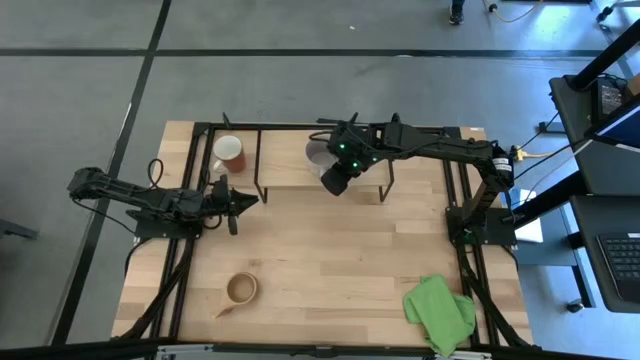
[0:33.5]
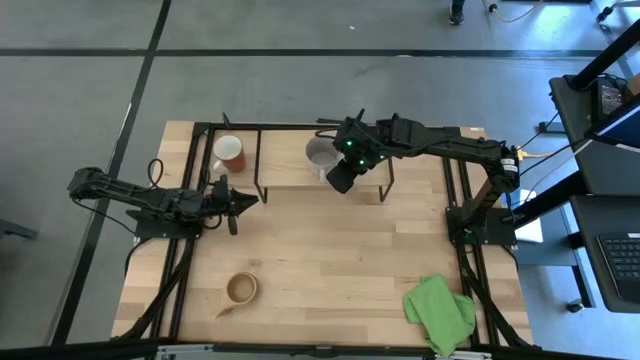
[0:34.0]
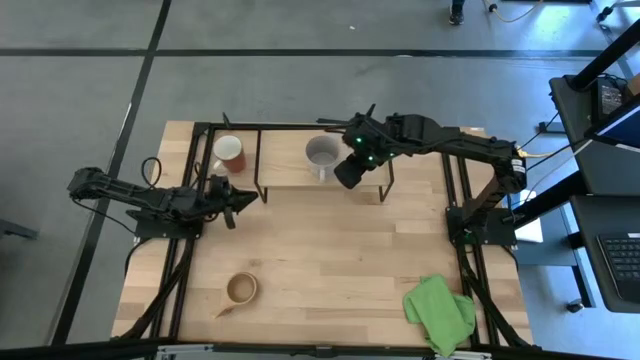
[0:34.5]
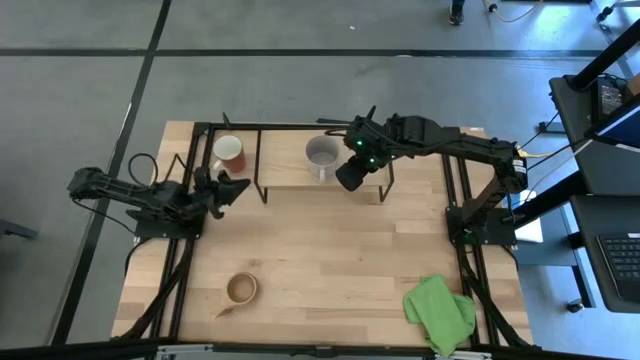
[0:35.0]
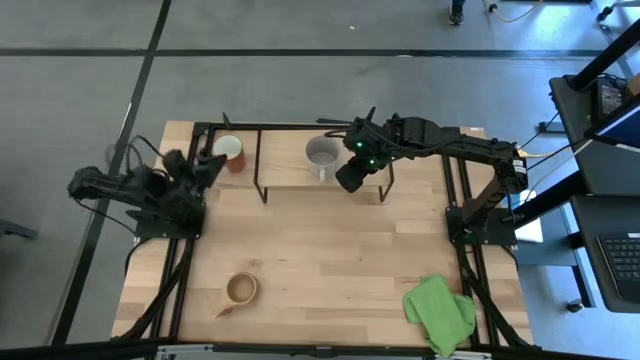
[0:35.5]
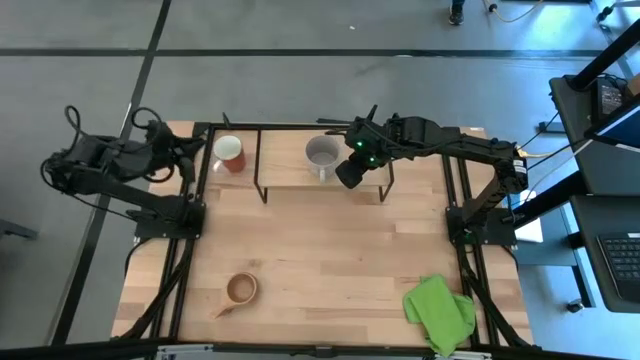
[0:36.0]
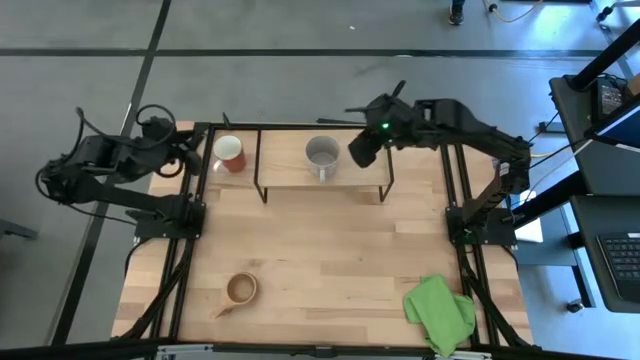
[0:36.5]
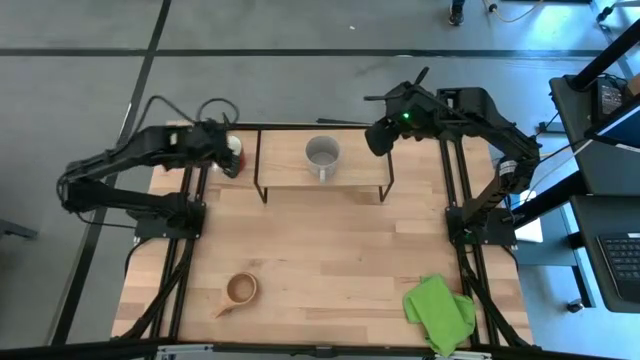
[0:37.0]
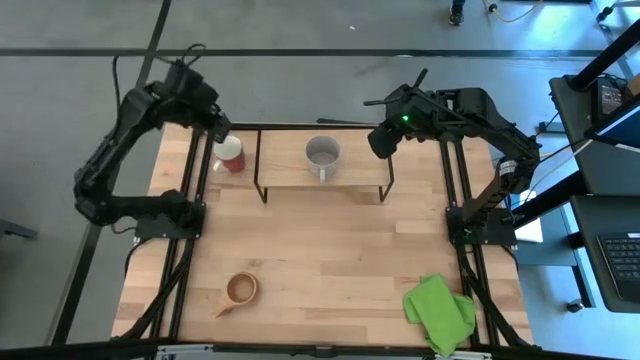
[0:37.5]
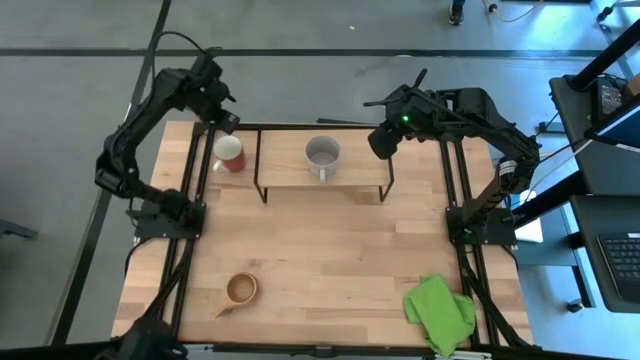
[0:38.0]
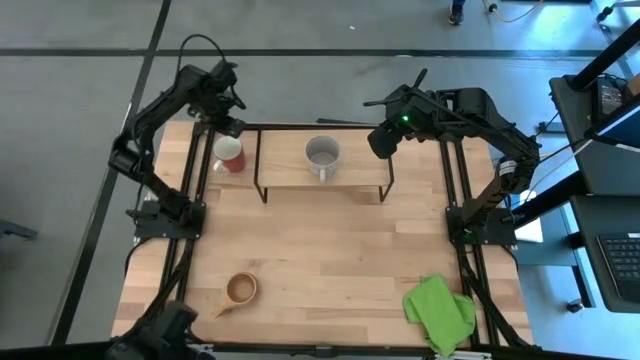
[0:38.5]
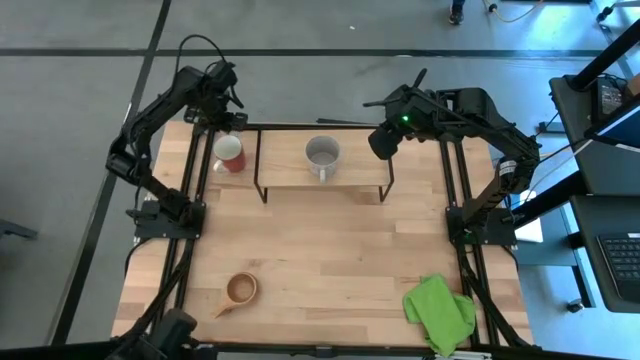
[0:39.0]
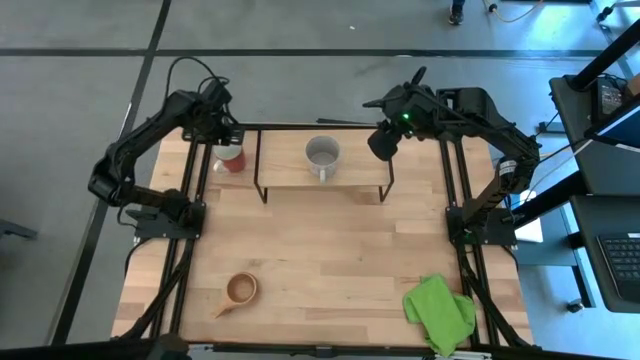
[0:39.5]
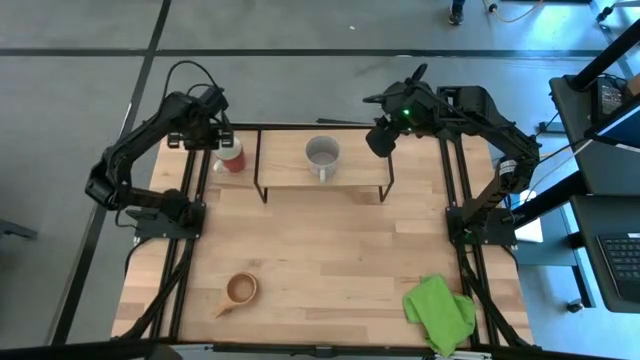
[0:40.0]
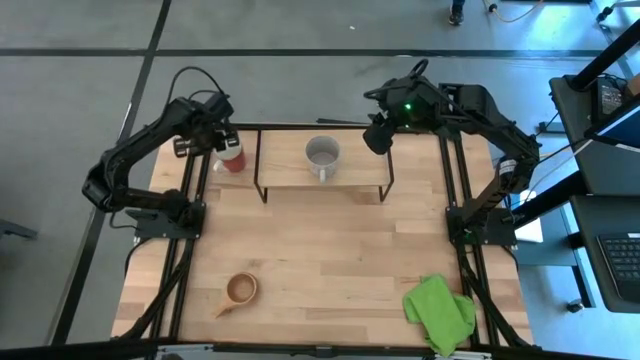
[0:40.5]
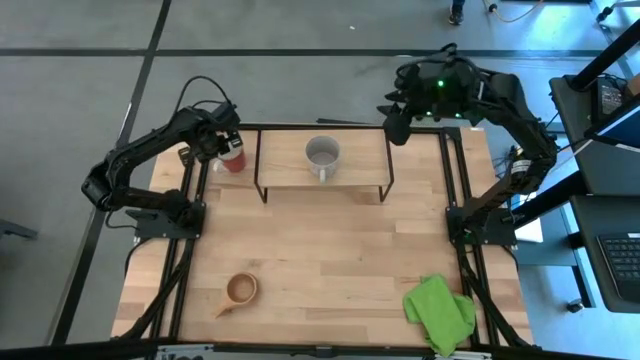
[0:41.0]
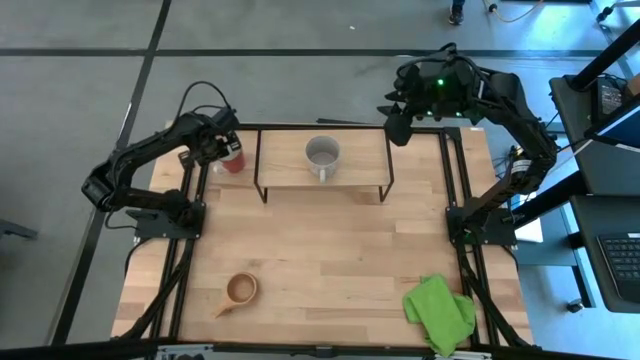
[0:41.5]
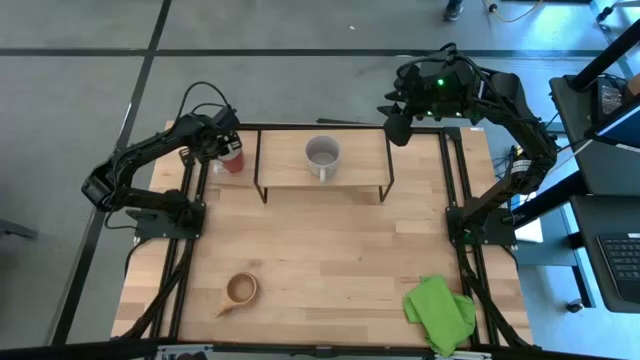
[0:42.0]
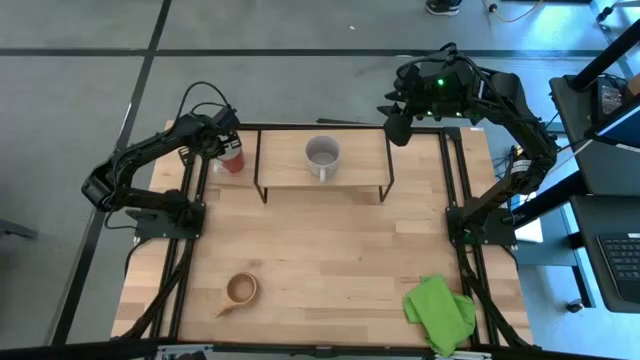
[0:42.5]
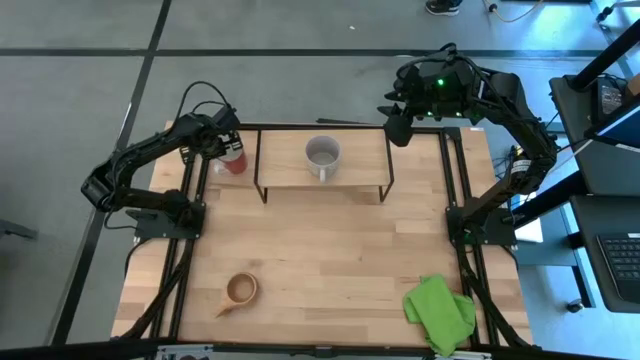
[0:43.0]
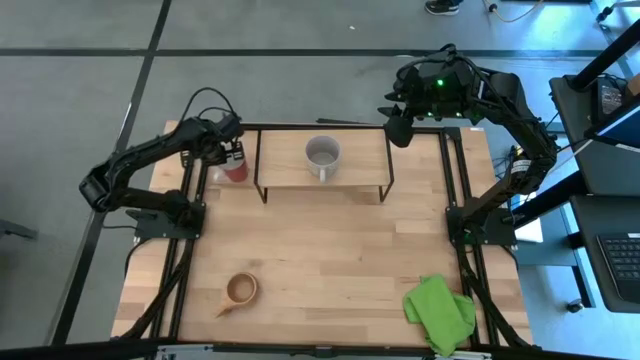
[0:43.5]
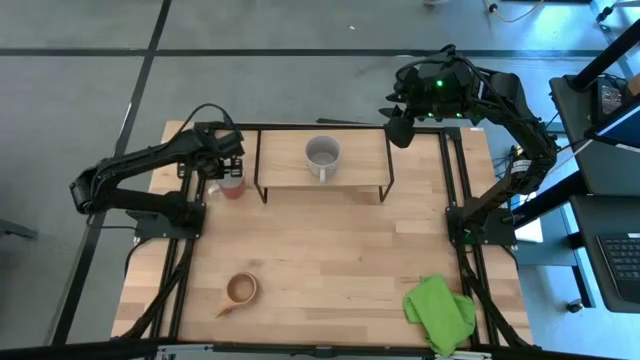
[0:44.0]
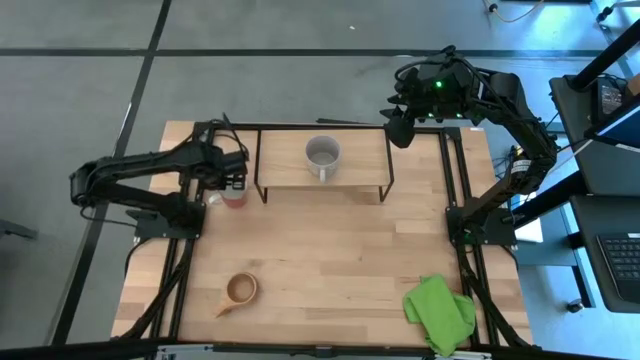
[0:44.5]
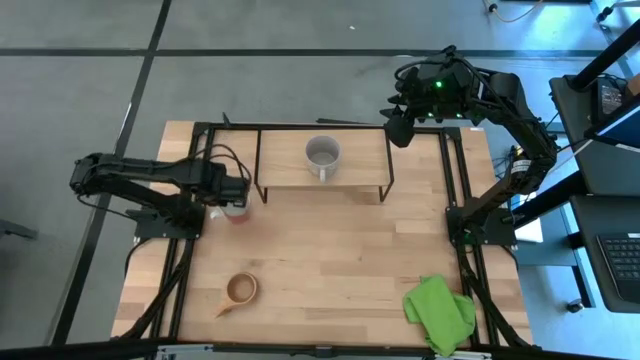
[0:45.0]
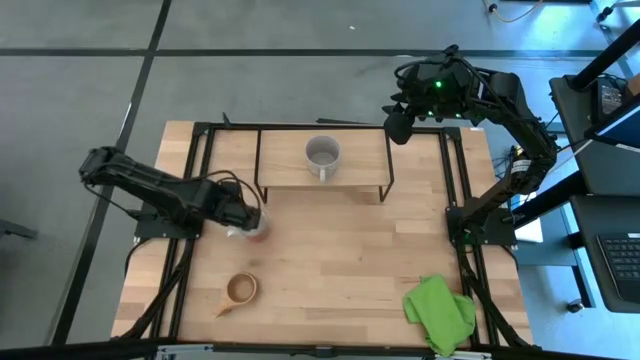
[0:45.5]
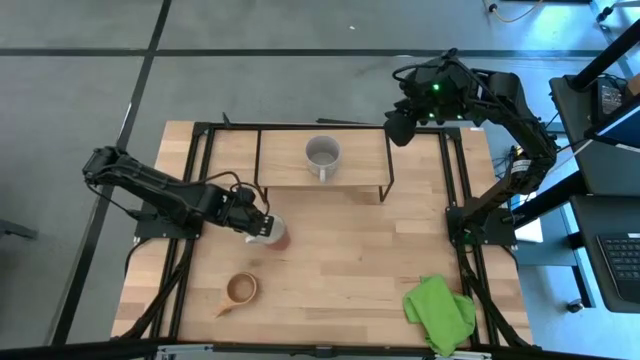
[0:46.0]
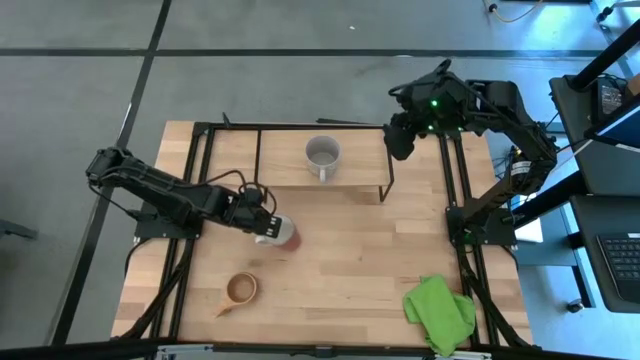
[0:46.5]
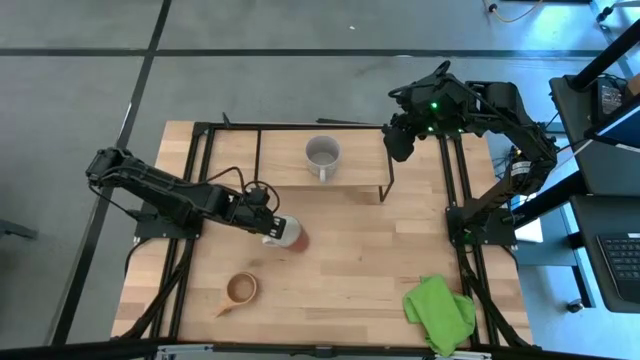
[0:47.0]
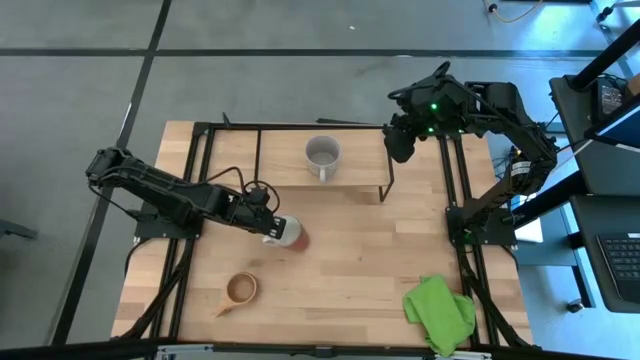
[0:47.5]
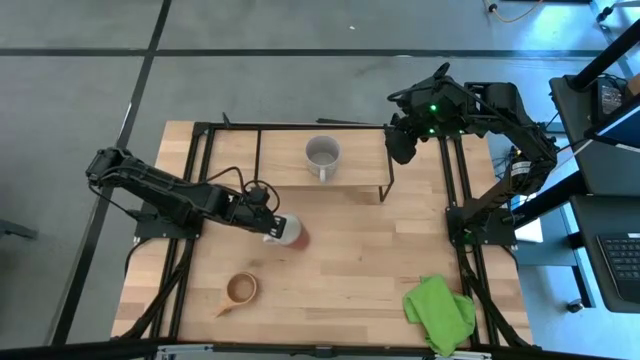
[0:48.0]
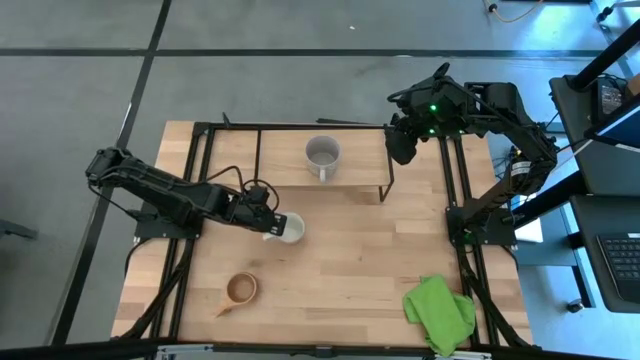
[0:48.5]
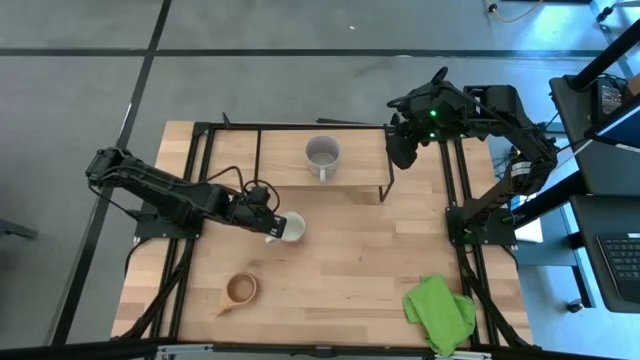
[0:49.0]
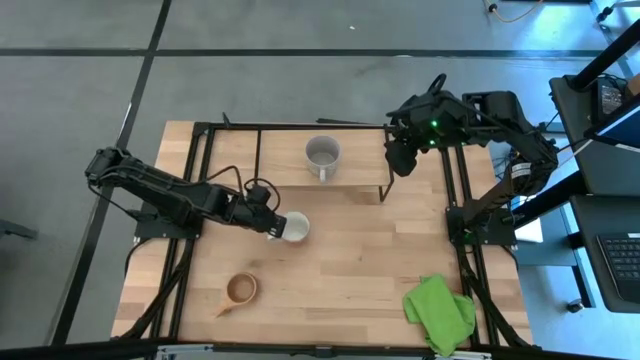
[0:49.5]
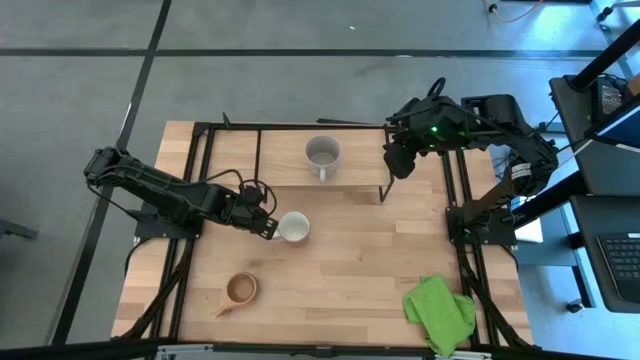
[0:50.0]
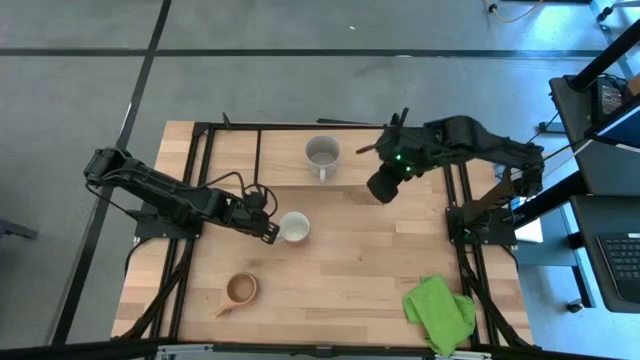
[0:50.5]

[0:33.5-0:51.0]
Task: Stack small to large cups/mugs on shelf
Put the red mug on the shelf
